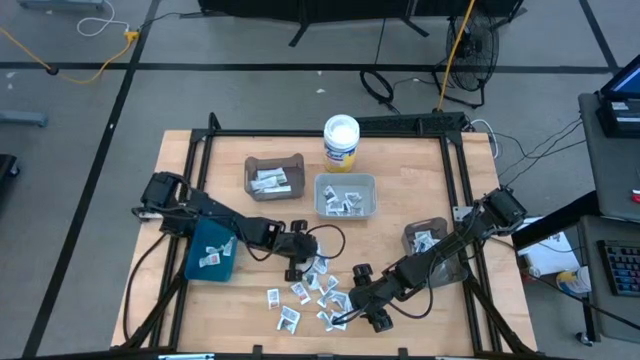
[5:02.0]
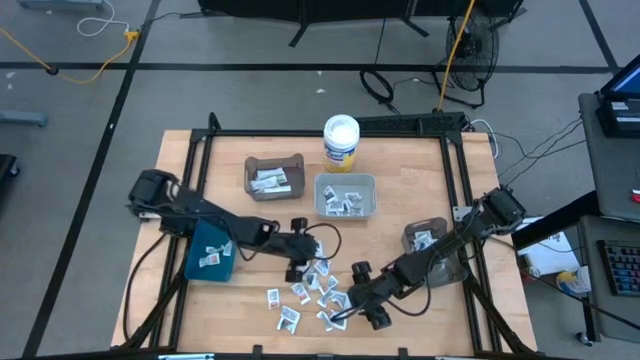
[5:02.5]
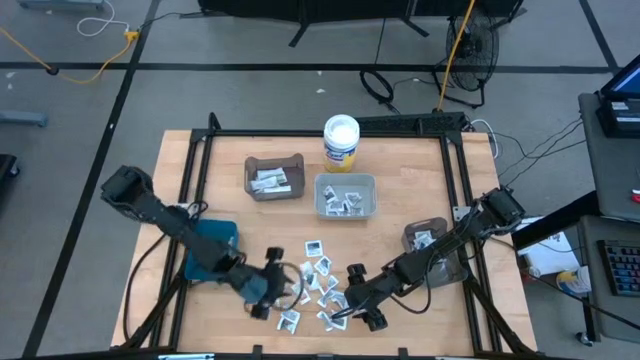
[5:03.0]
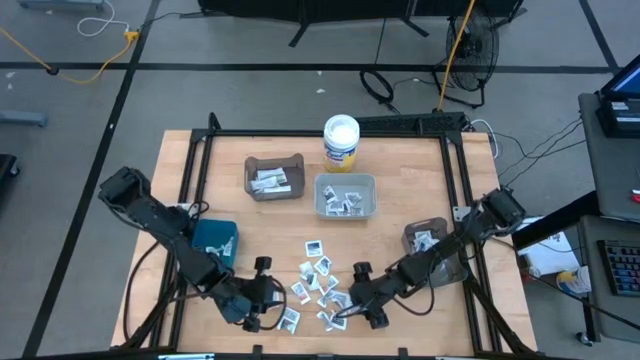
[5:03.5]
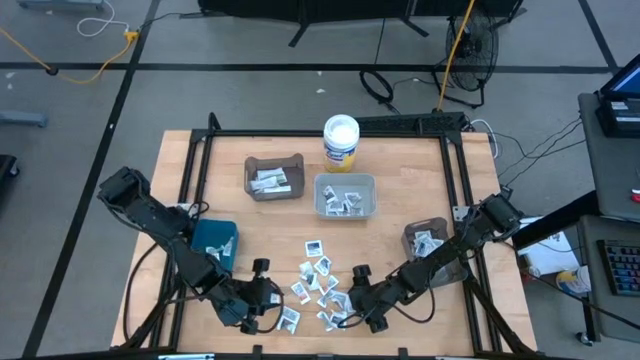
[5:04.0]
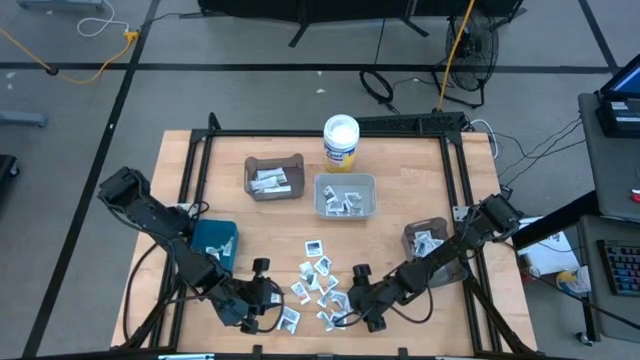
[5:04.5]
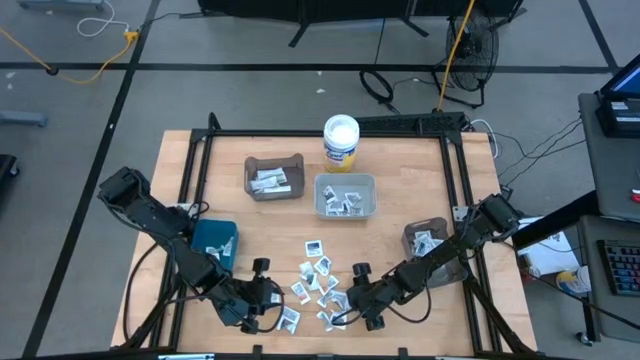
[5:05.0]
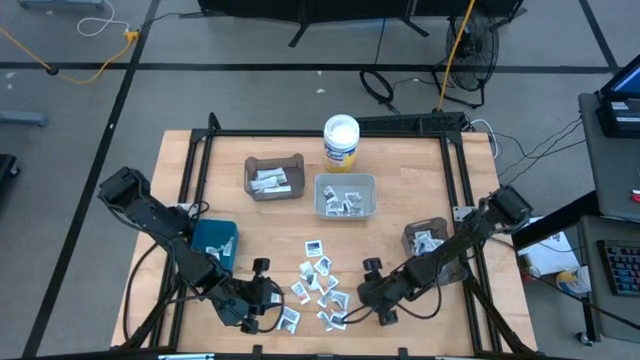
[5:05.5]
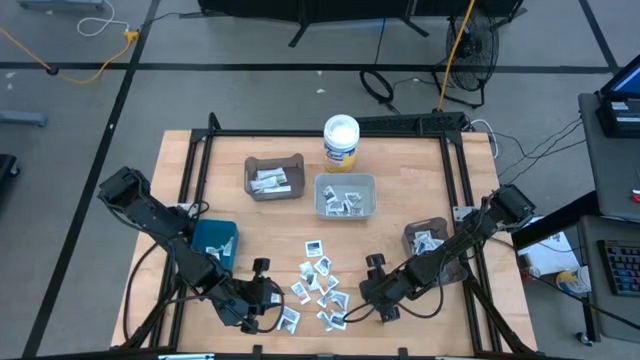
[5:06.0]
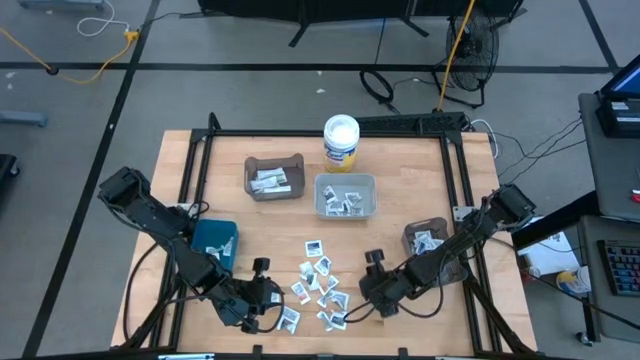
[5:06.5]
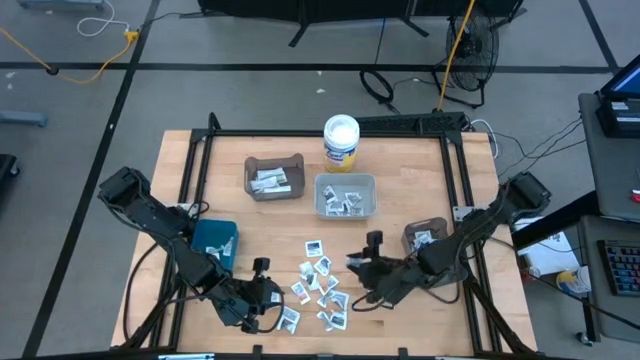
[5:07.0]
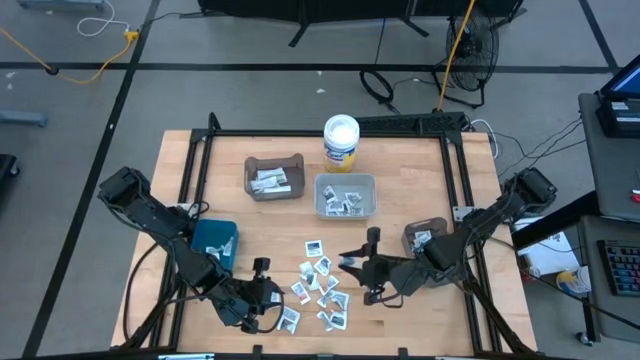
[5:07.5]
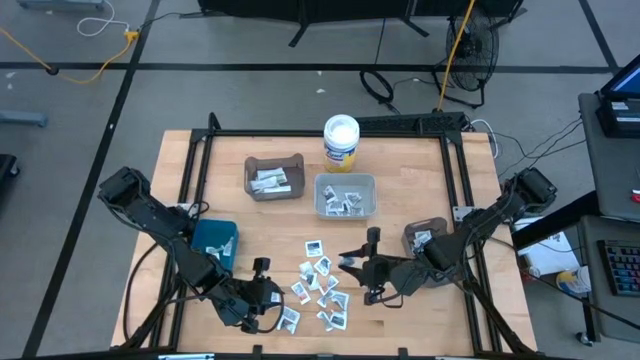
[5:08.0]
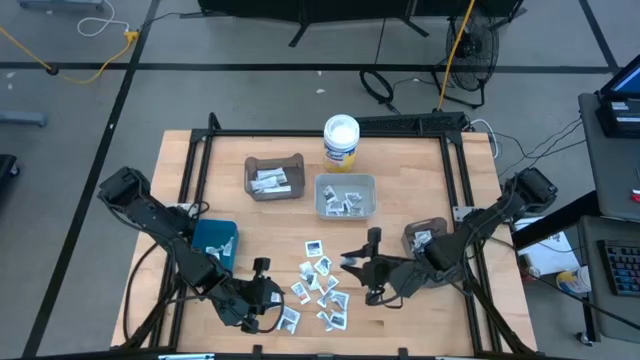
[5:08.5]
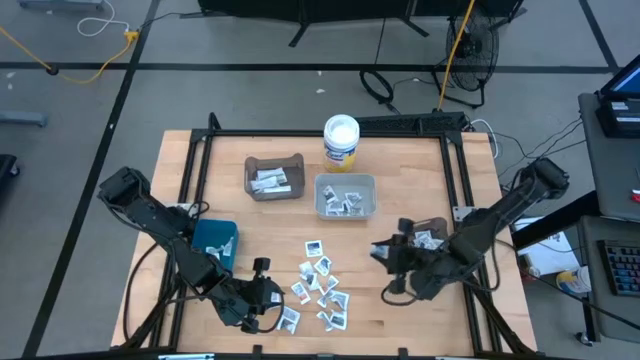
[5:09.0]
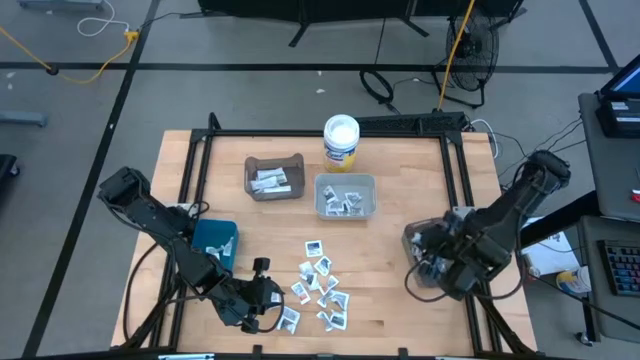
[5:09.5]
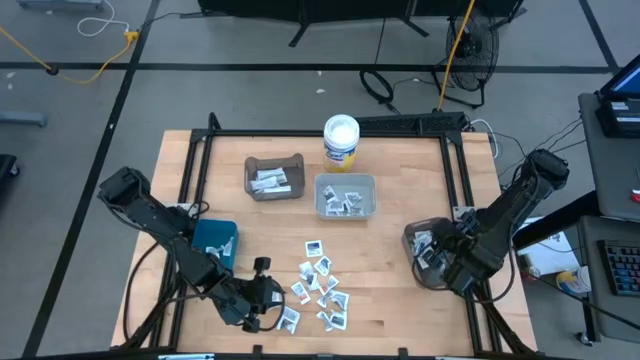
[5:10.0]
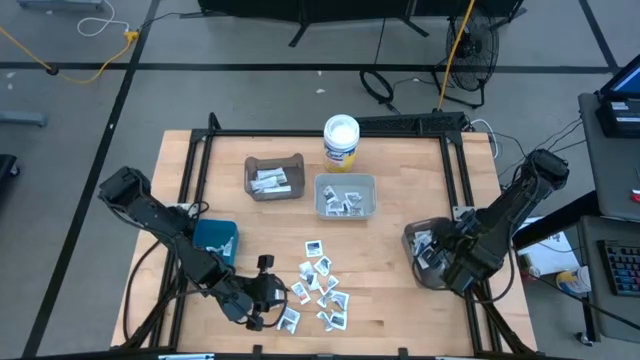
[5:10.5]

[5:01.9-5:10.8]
Task: Pick & Place First Aid Supplies
Put the blue alcohol pad into the bottom black bin

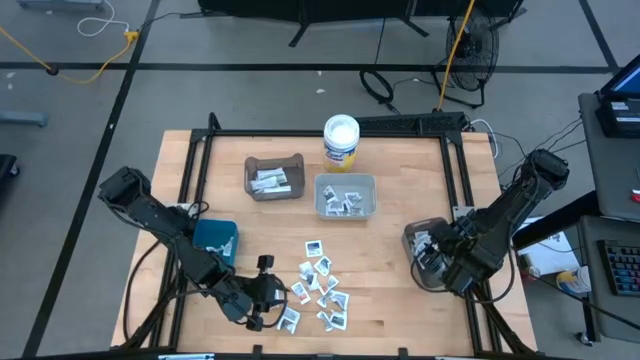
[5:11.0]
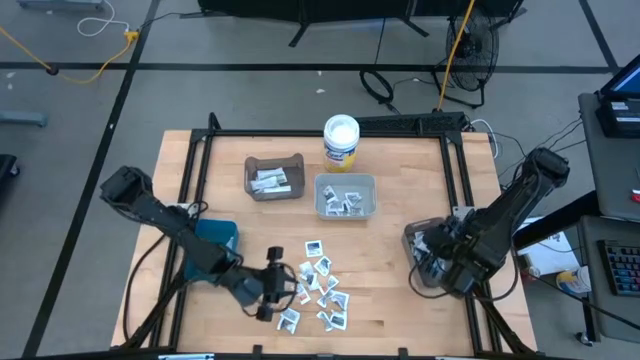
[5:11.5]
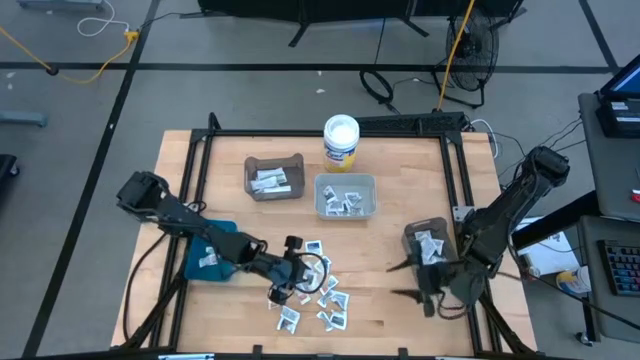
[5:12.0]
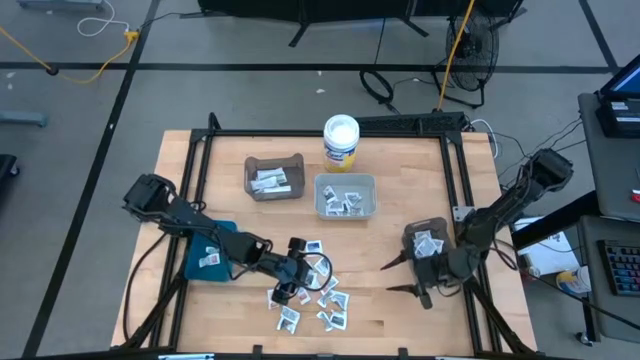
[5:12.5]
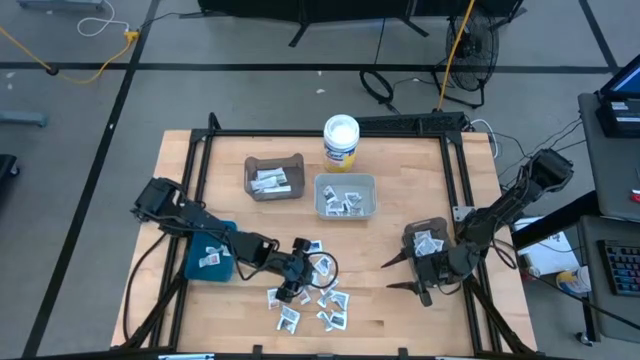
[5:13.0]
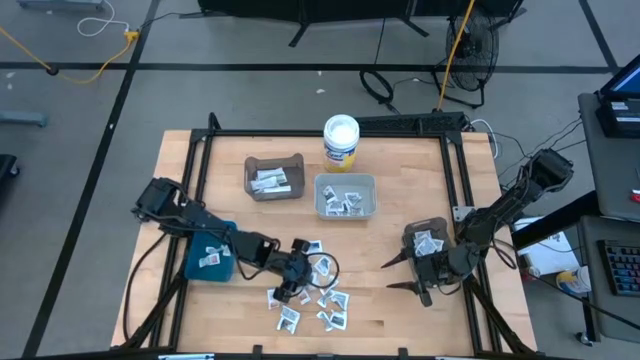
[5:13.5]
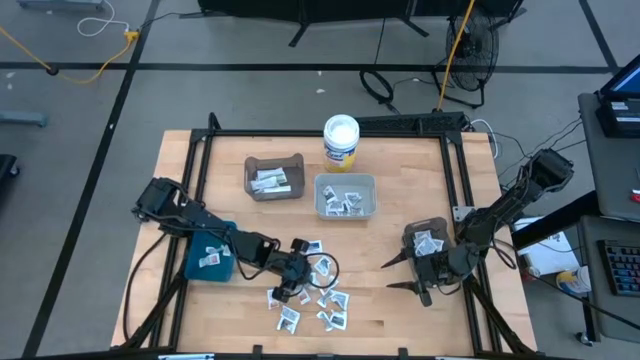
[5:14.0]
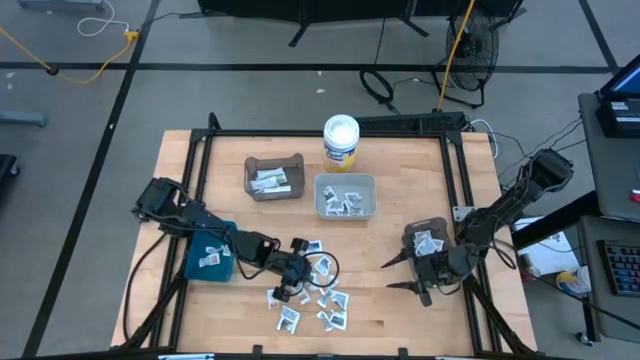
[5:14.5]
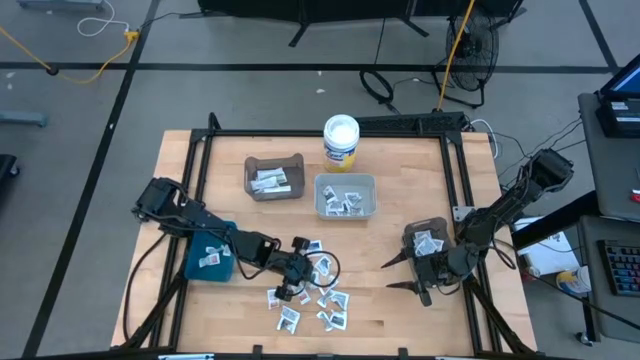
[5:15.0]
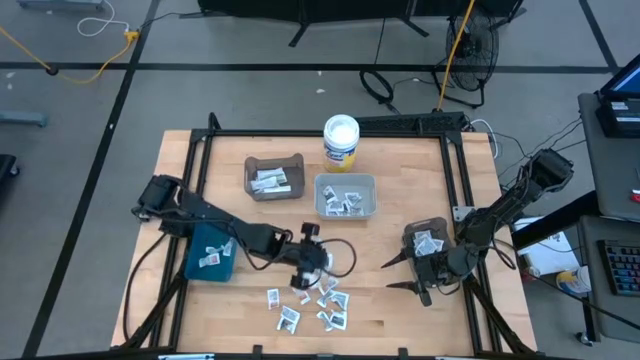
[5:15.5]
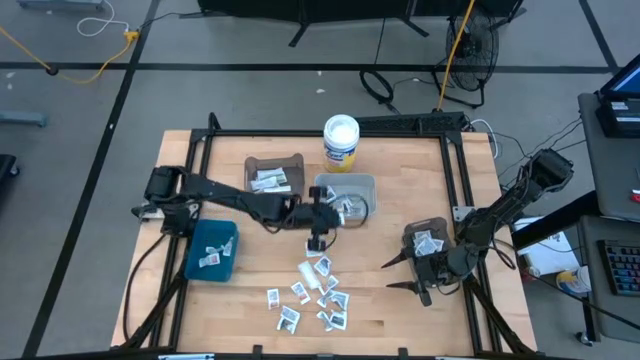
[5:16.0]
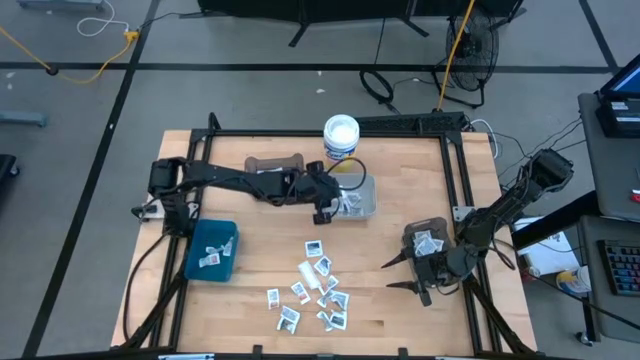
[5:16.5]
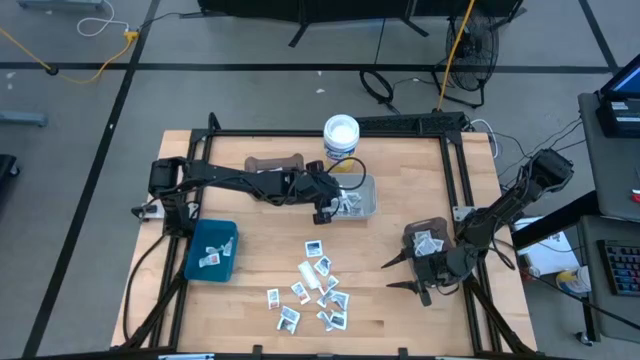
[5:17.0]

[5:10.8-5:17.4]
Put the gray towelette pack into the gray bin

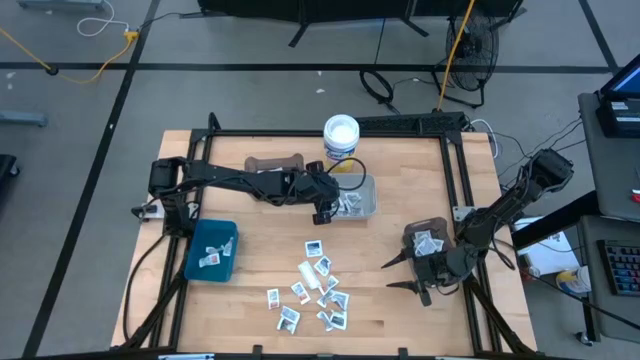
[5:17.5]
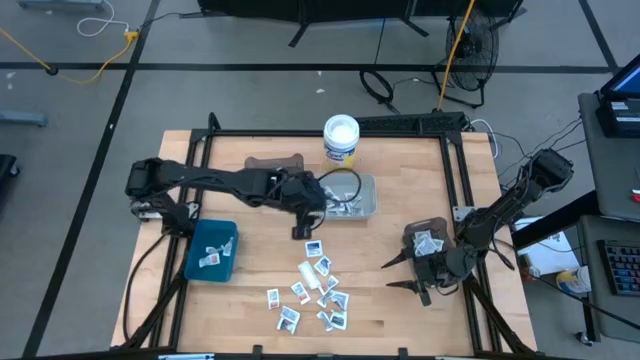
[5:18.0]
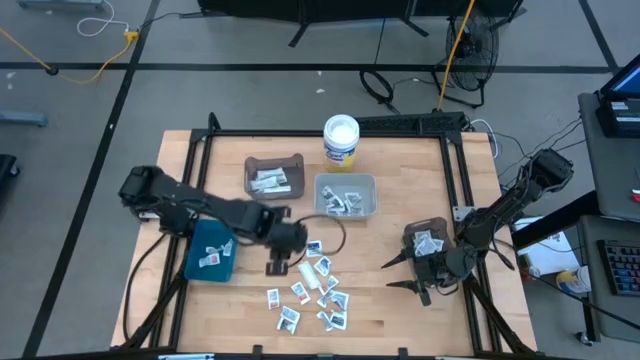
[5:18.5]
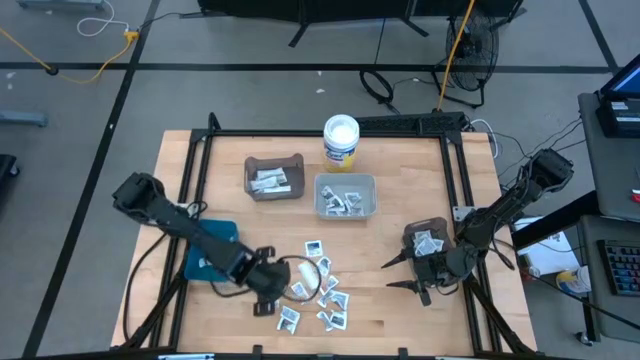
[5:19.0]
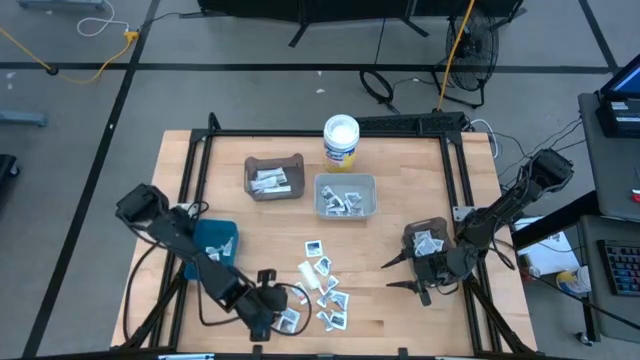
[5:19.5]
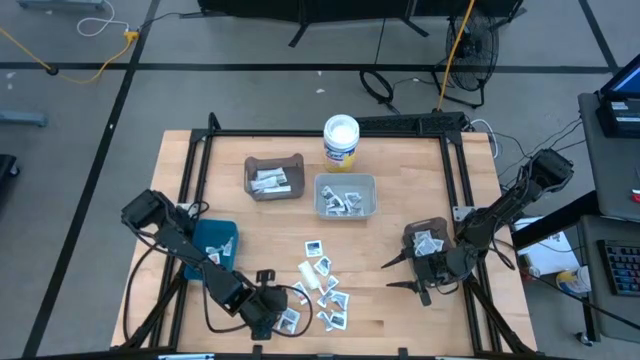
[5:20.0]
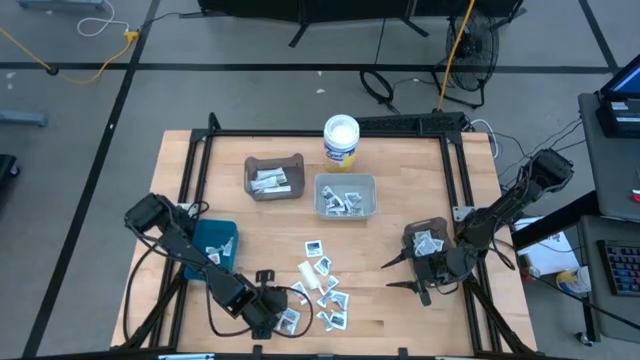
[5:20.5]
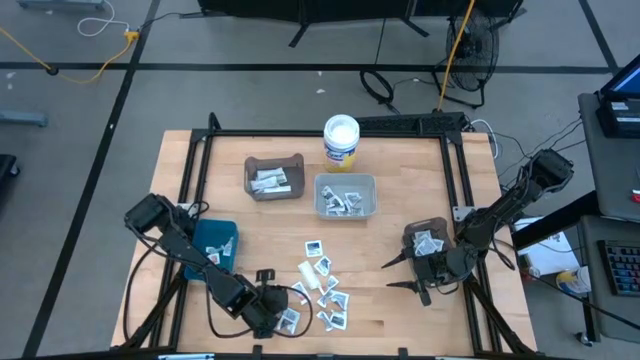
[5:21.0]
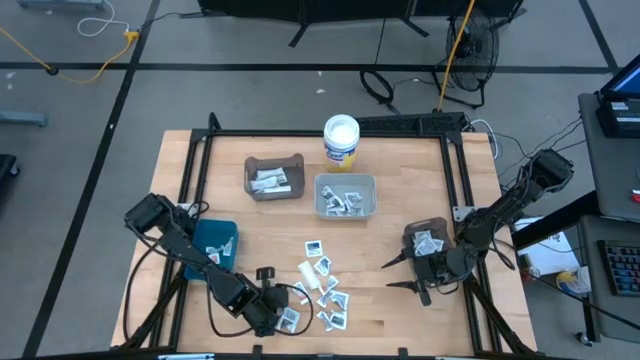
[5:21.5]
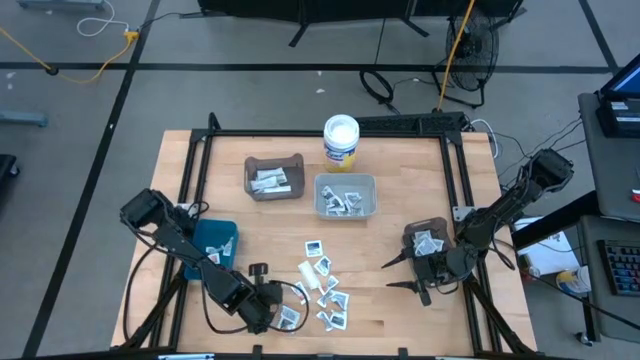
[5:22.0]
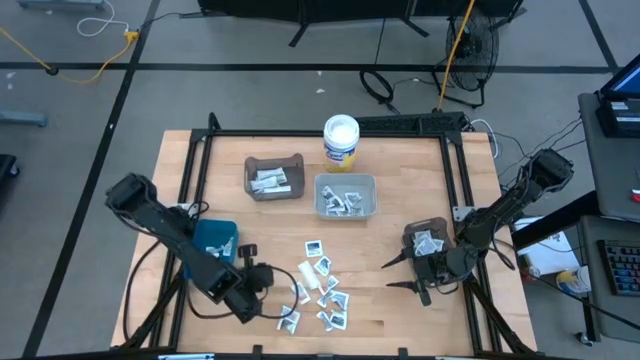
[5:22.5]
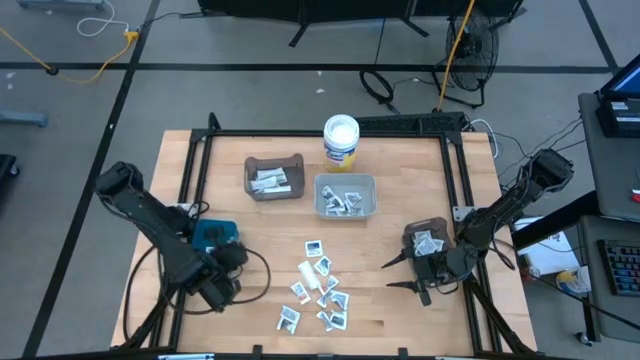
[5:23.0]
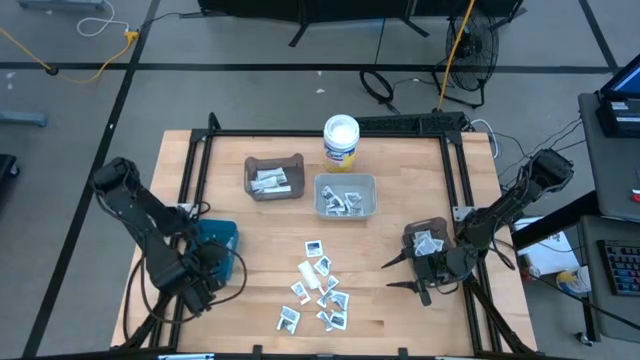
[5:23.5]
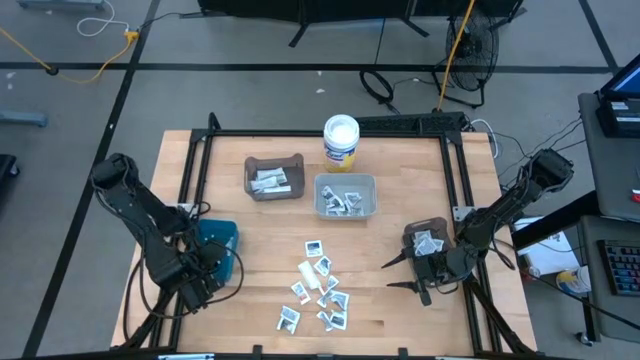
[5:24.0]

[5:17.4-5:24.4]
Put the orange ointment pack into the blue bin
